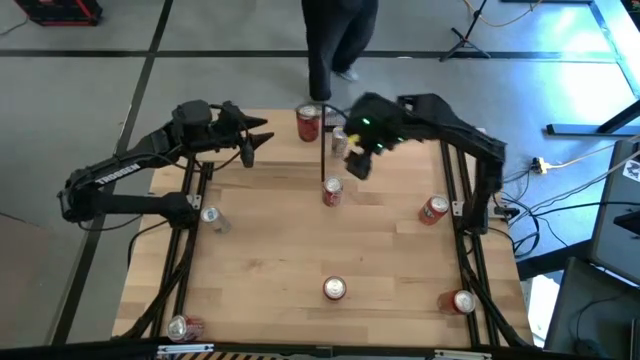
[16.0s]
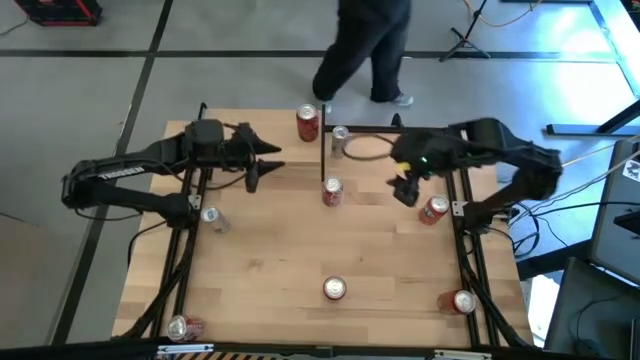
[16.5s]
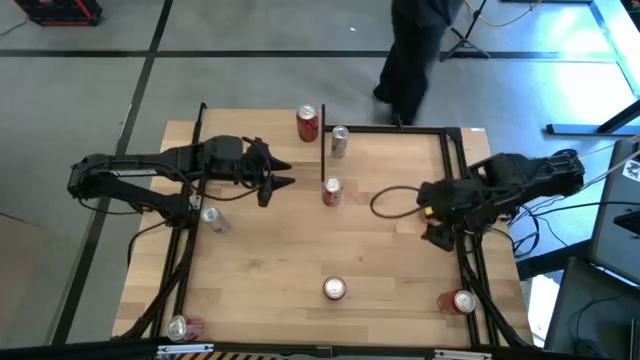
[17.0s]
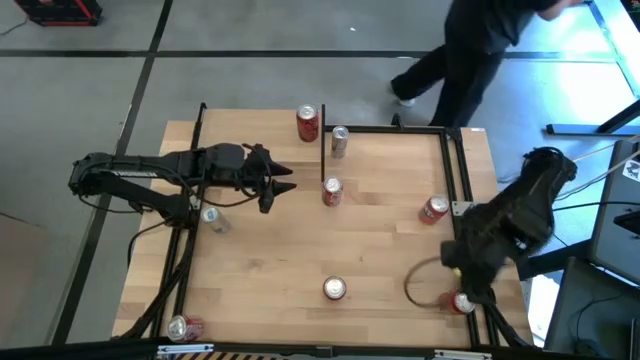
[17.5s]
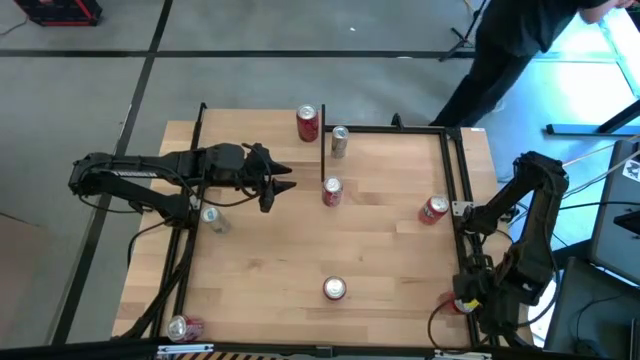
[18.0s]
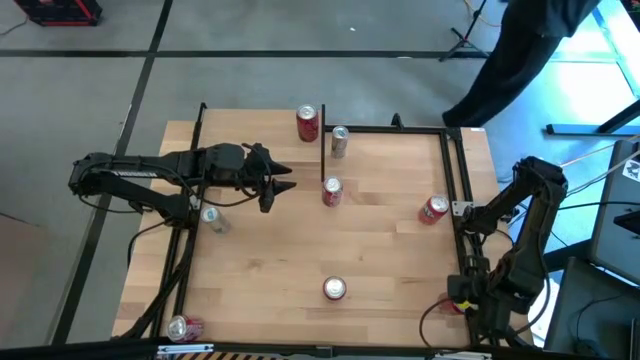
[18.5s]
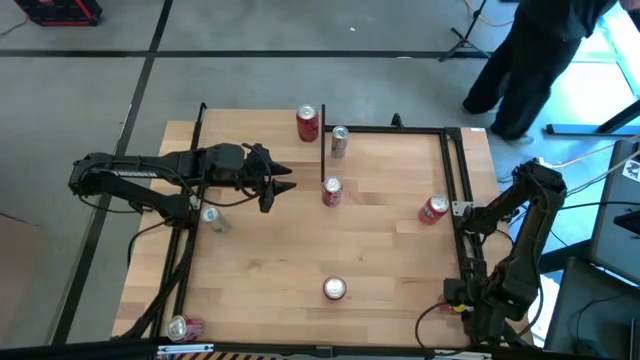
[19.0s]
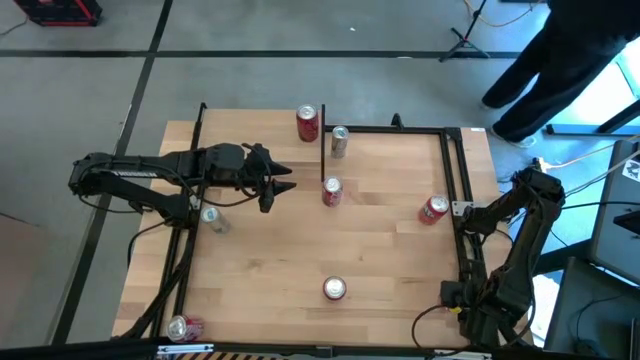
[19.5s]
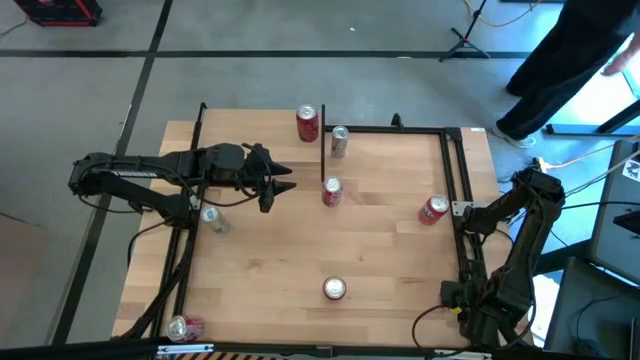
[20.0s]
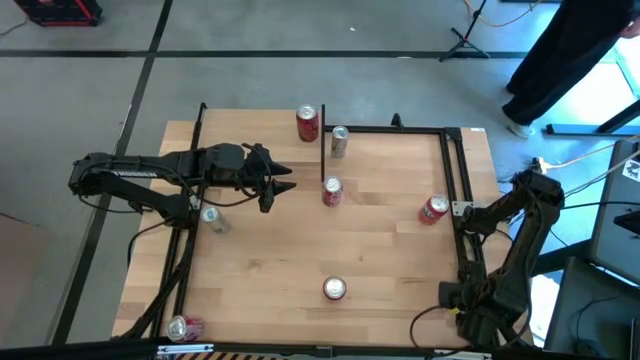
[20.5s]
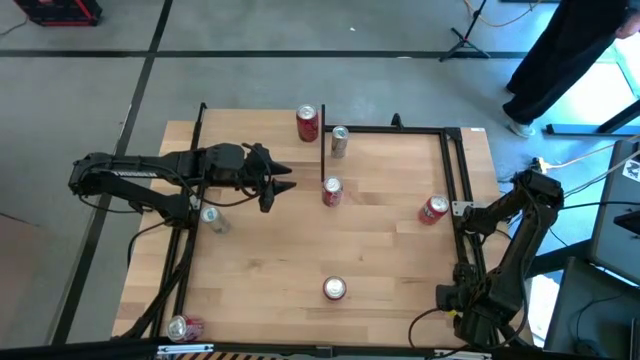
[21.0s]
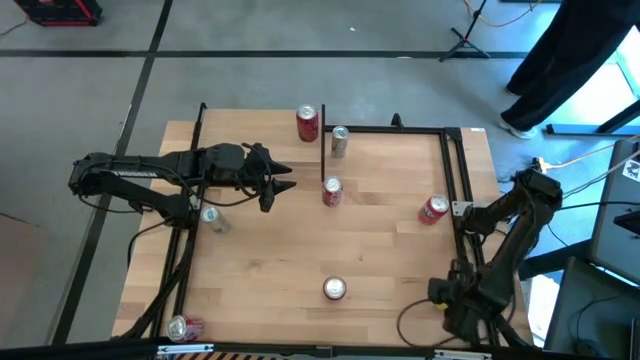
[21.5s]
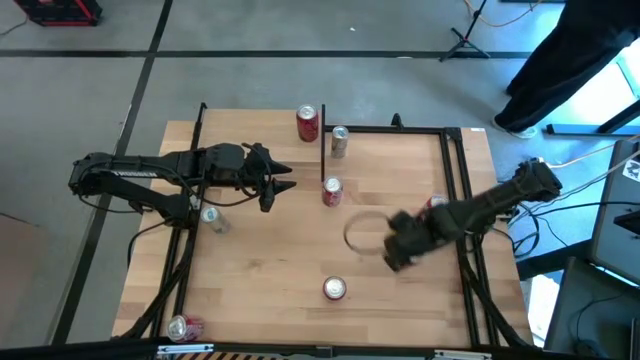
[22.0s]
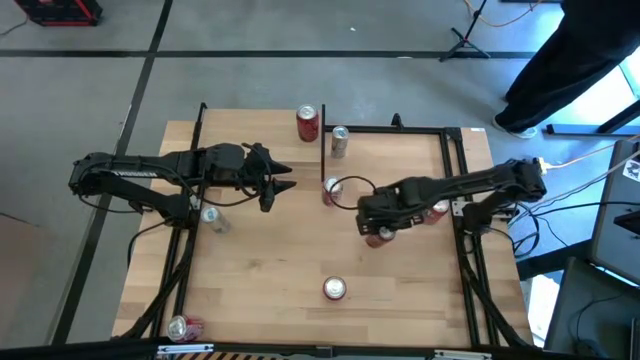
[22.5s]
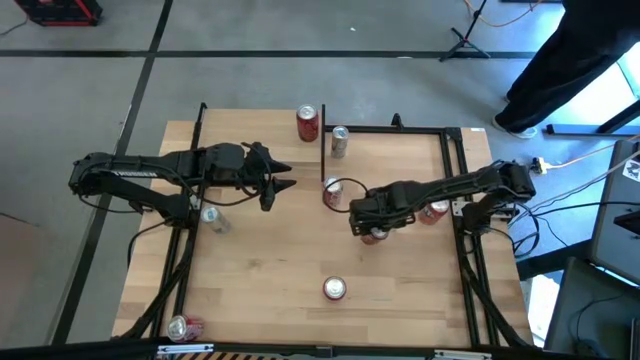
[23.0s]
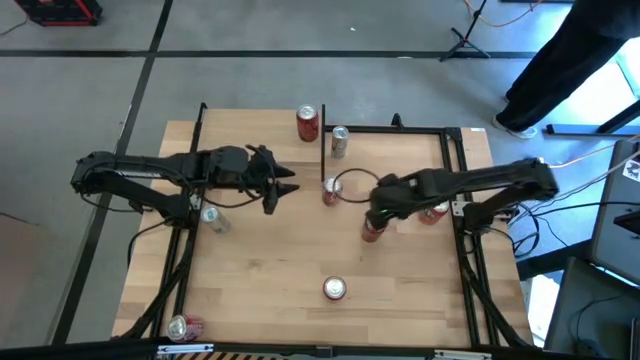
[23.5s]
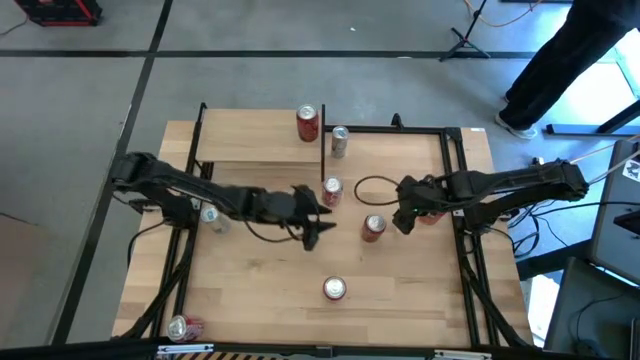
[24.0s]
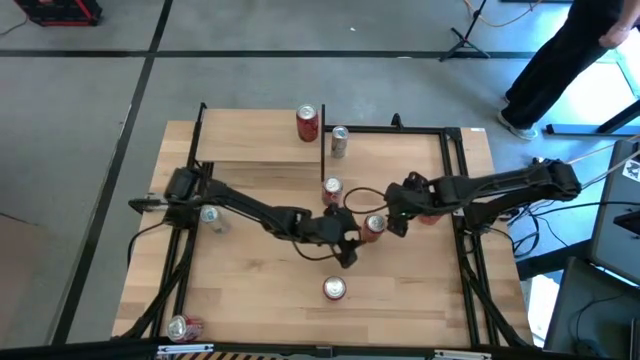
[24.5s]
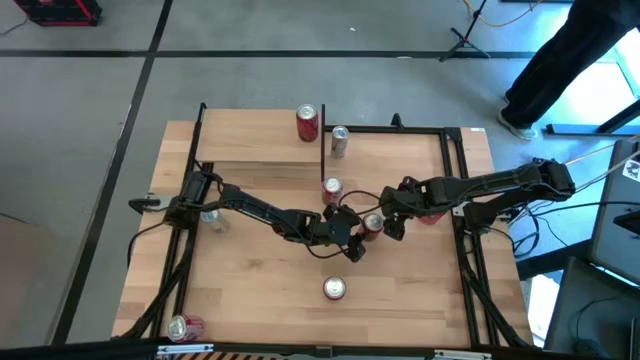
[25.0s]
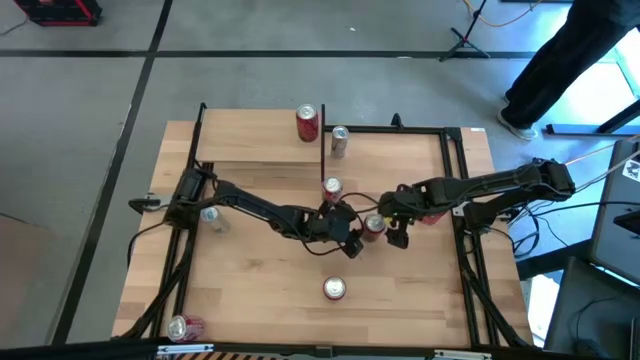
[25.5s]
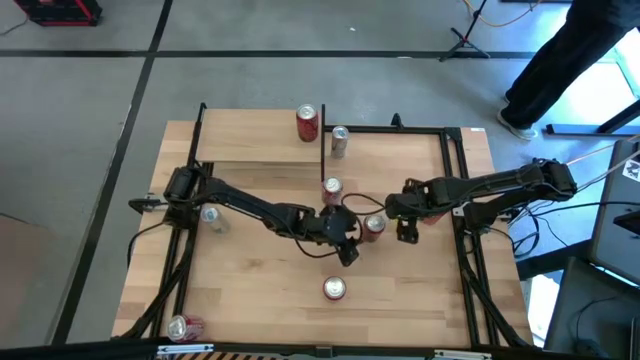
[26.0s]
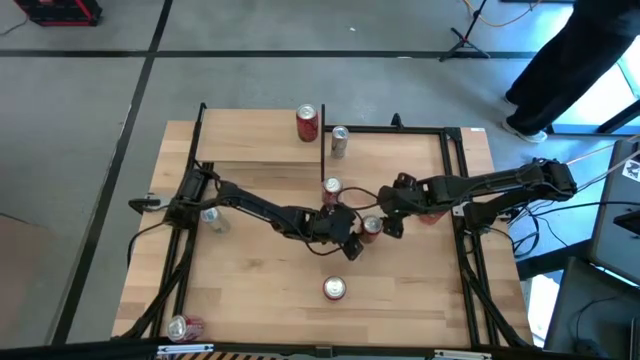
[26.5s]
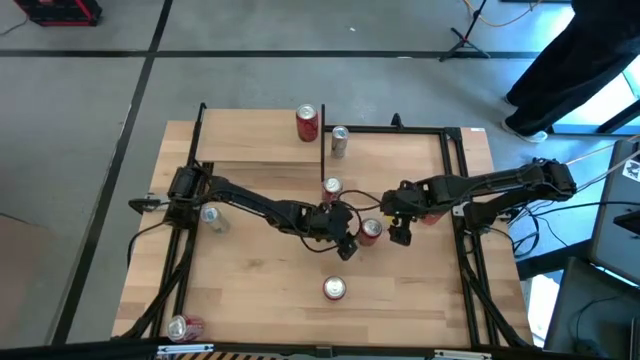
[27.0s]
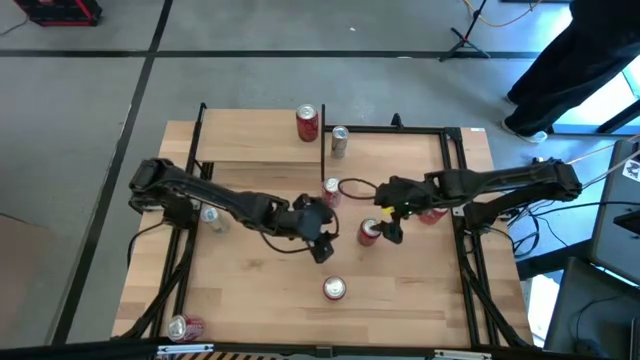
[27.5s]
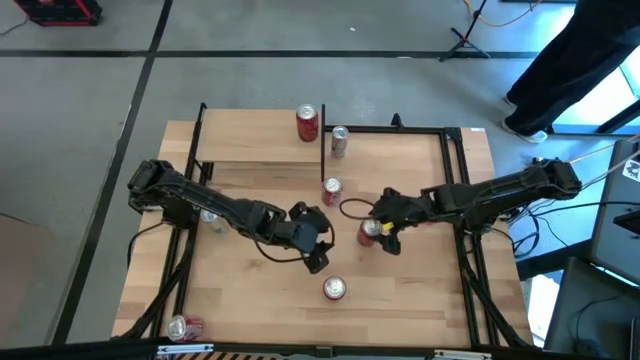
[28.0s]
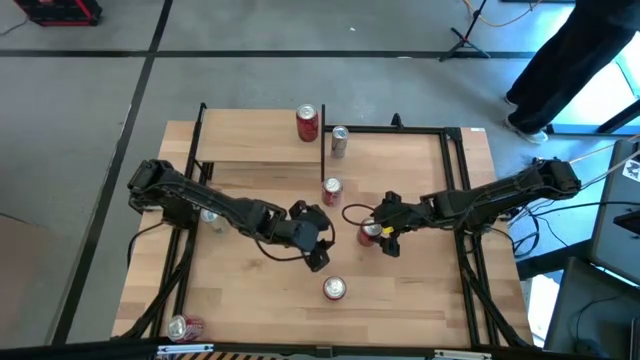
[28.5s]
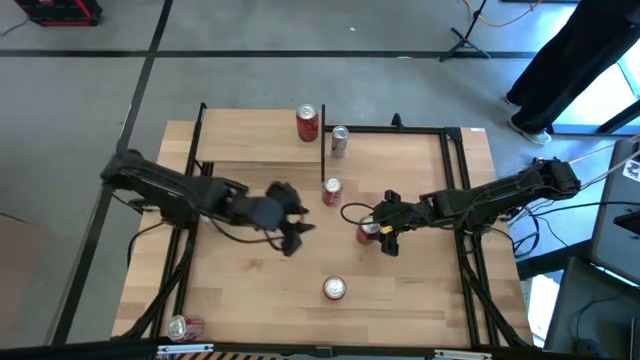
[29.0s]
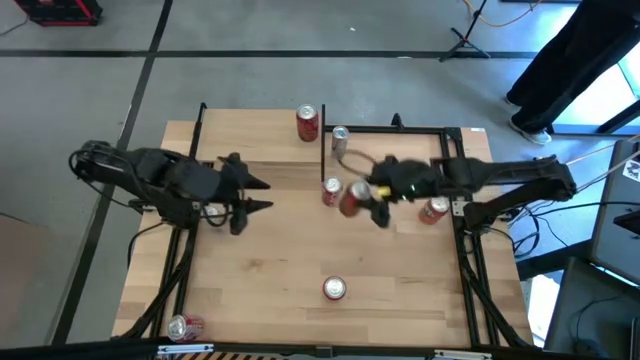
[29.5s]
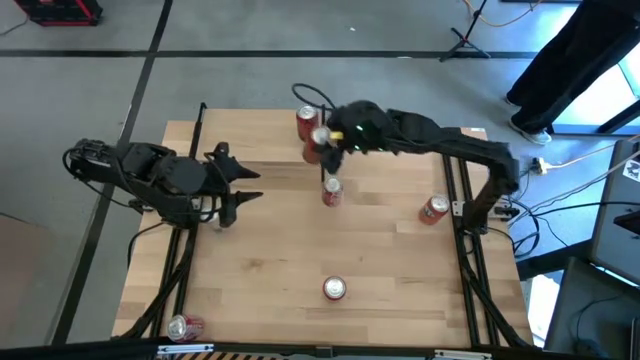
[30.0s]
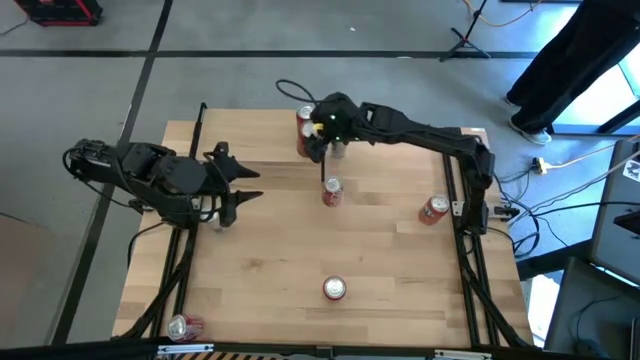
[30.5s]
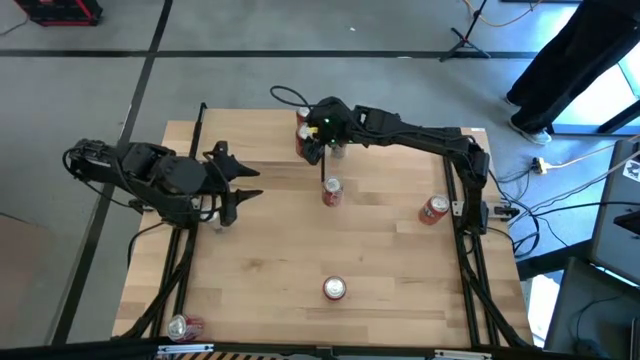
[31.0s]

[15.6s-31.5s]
Task: Place canned beverage on shelf
Put the red-black soda can on the shelf aligned with the other red-black soda can

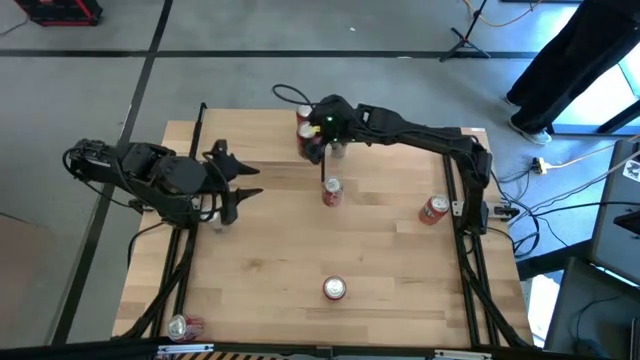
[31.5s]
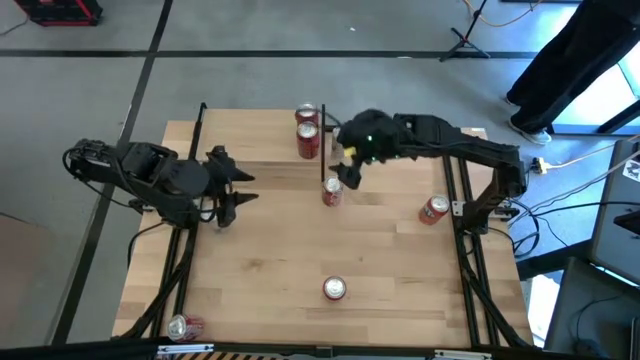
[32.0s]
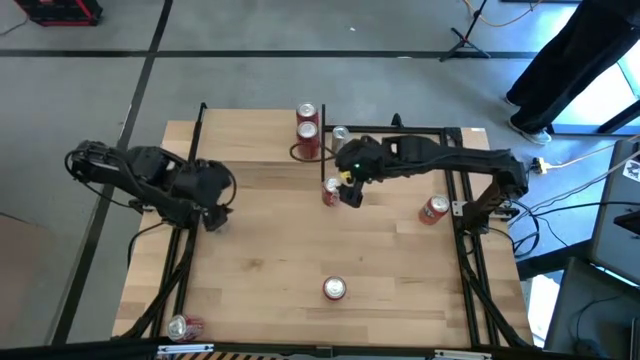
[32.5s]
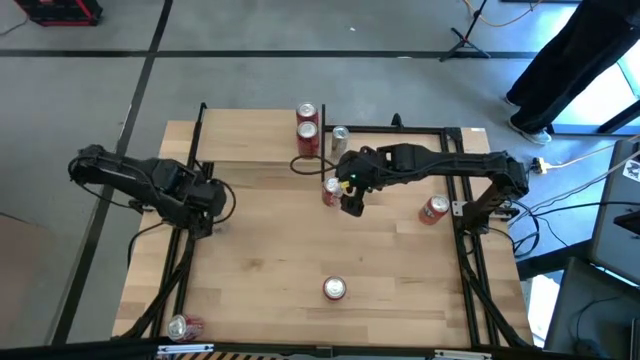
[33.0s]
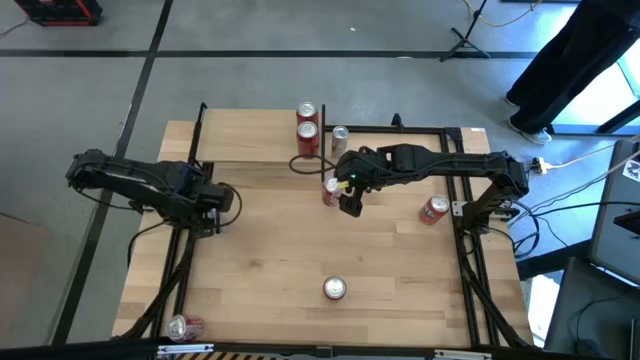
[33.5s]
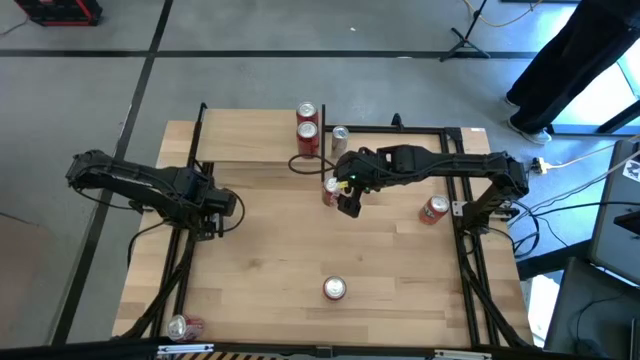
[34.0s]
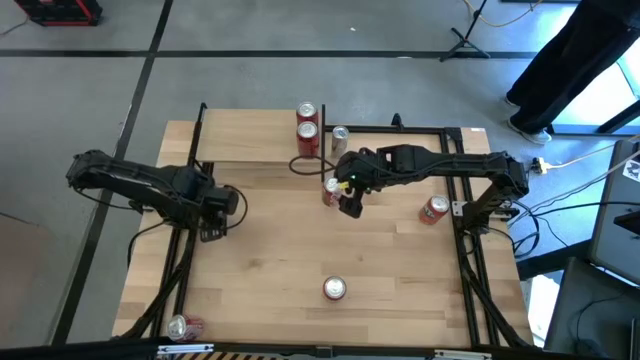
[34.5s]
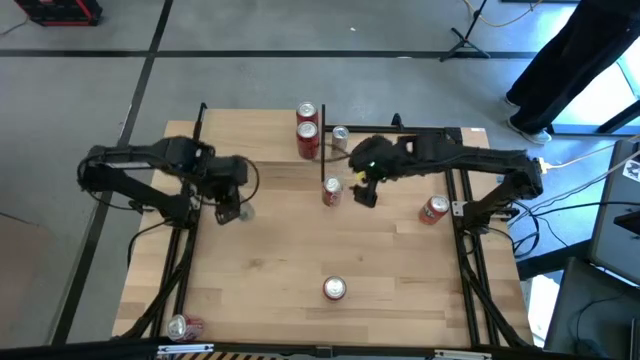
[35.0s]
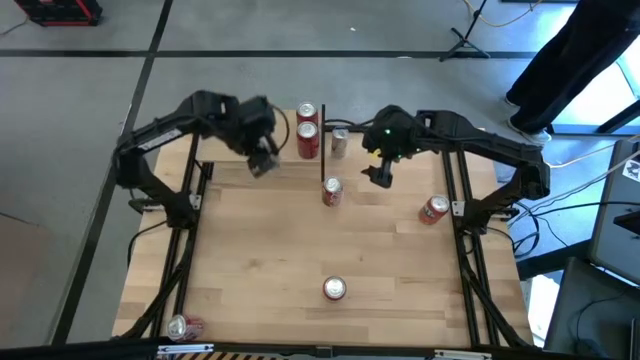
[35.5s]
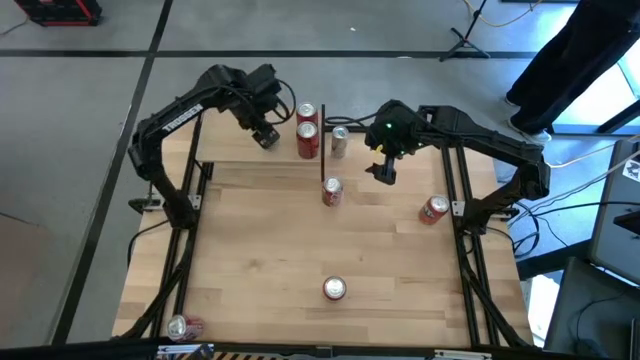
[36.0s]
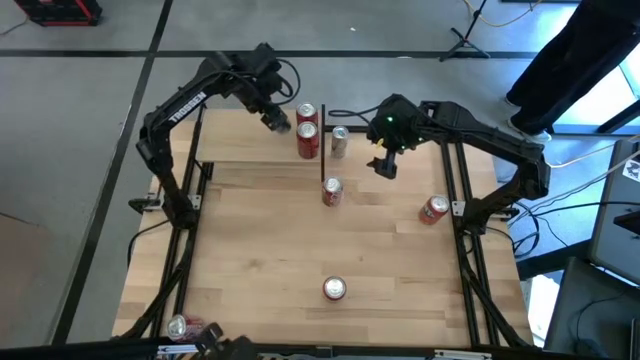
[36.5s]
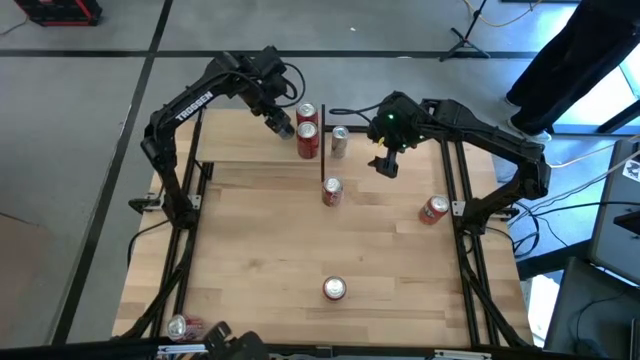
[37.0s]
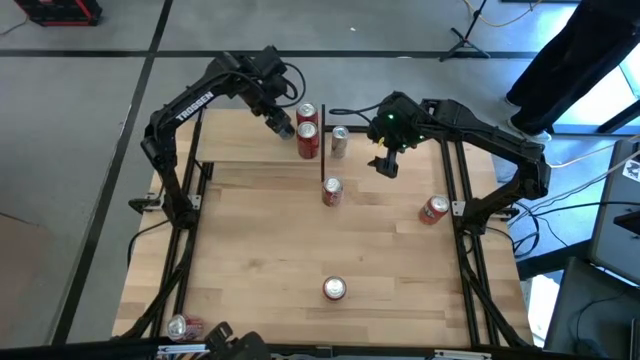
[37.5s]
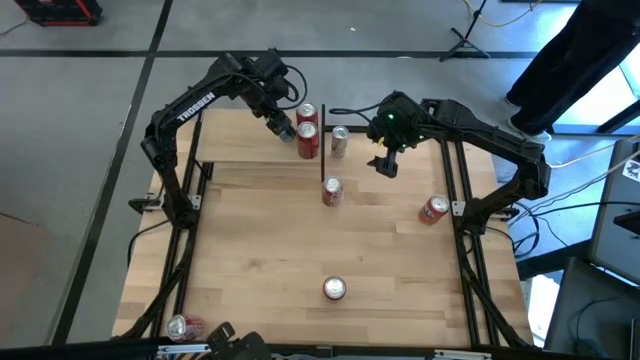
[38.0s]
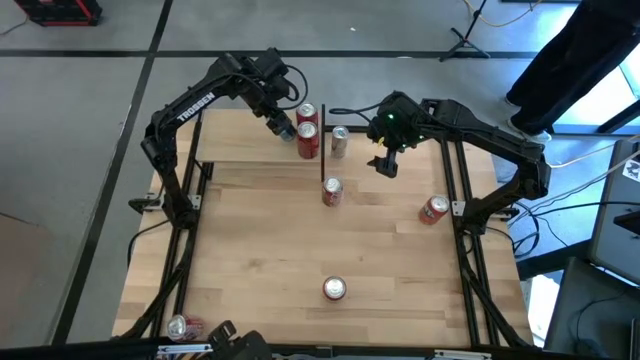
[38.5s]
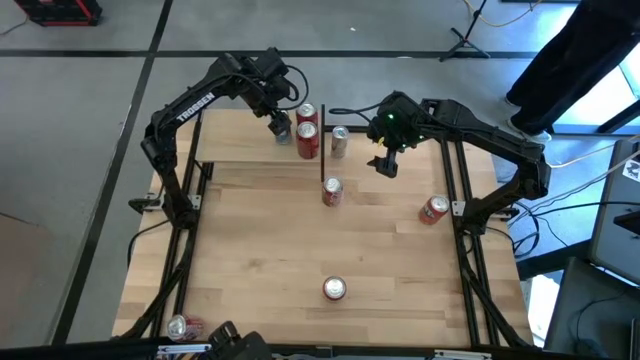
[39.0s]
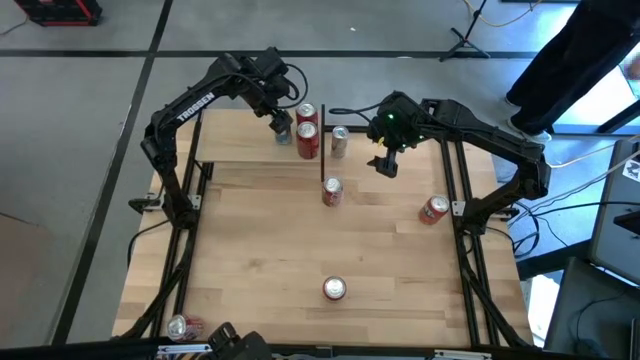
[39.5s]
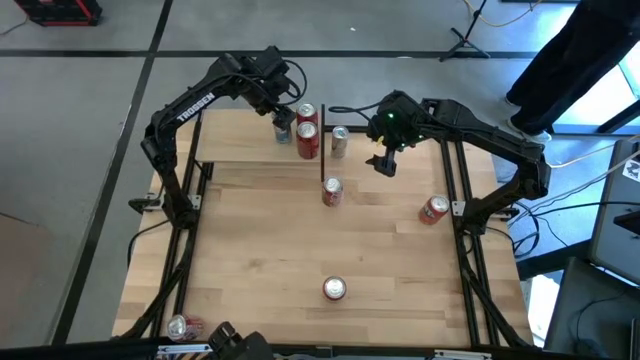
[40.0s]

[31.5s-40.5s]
Put the bottom blue soda can on the shelf
